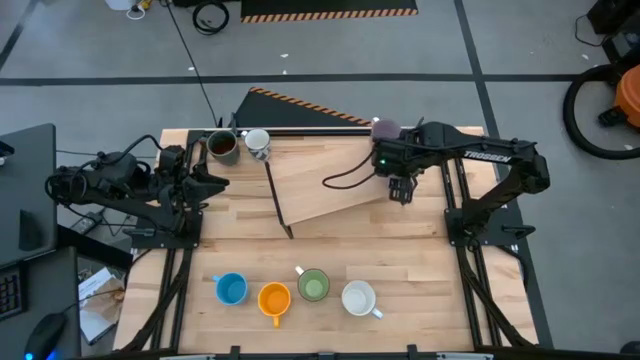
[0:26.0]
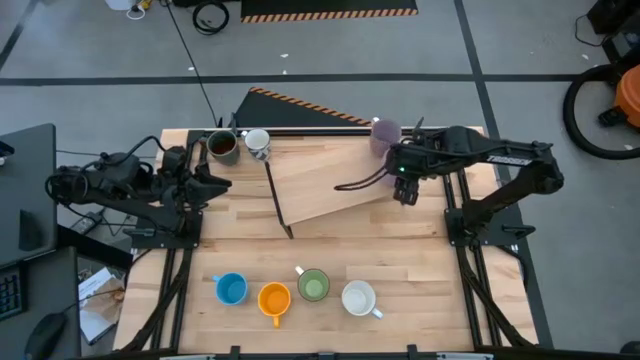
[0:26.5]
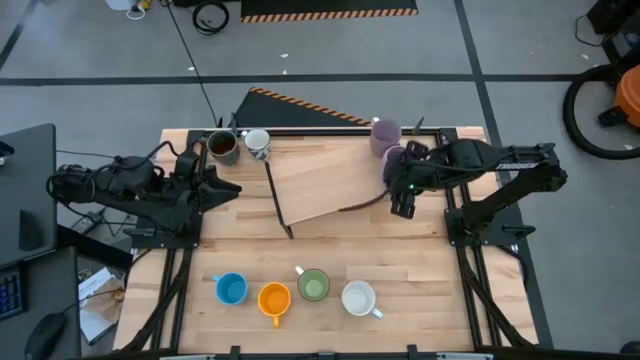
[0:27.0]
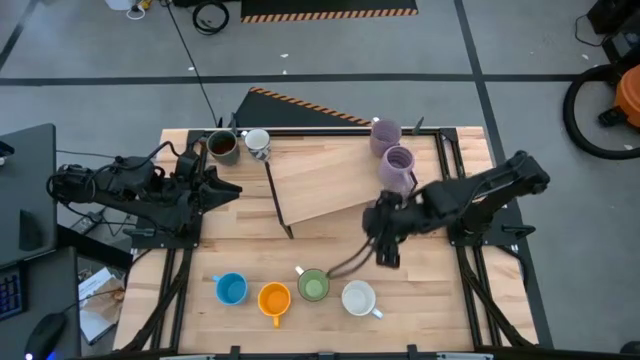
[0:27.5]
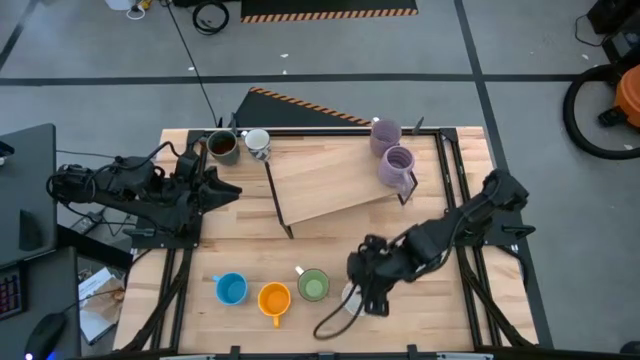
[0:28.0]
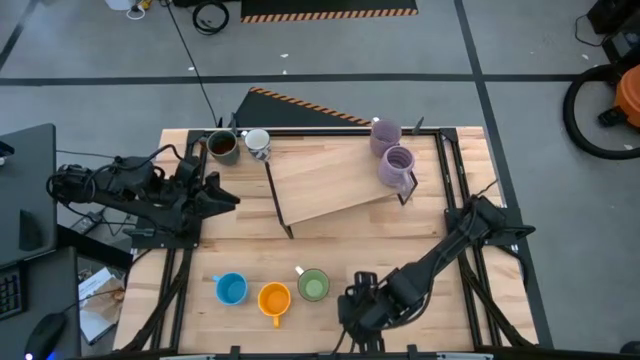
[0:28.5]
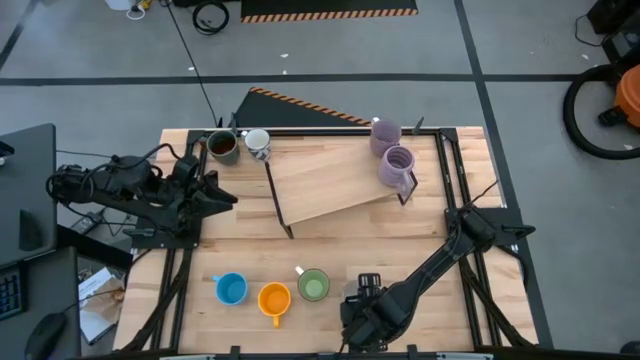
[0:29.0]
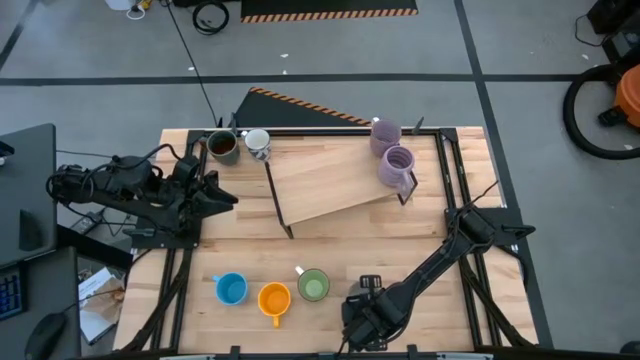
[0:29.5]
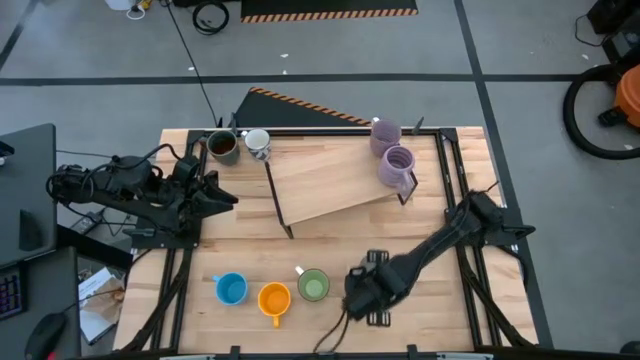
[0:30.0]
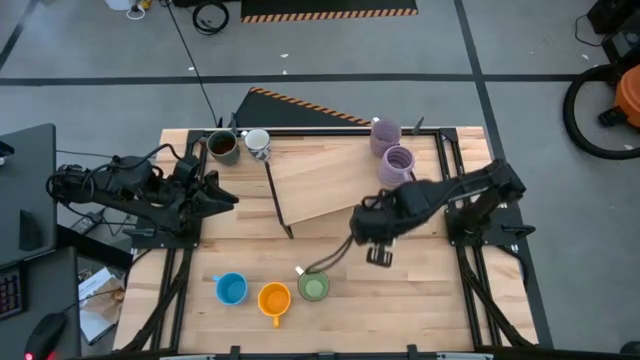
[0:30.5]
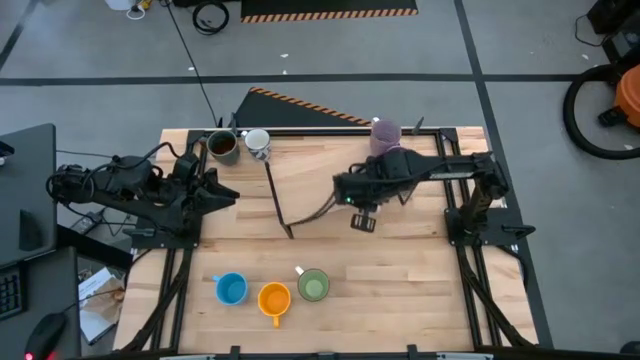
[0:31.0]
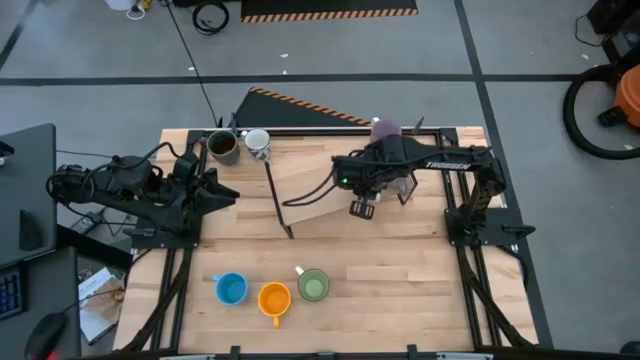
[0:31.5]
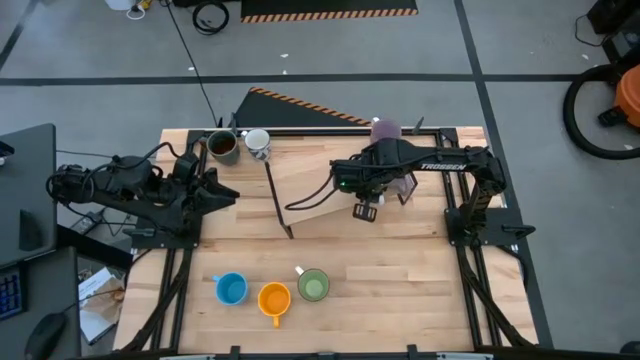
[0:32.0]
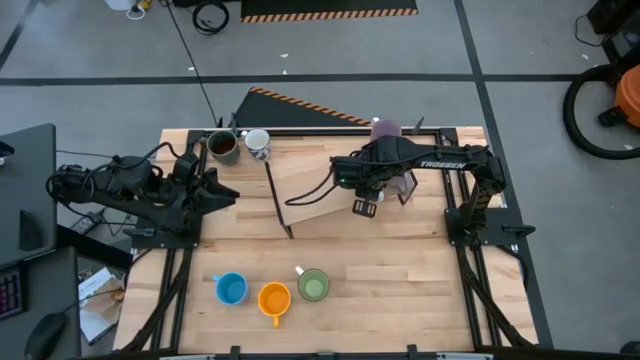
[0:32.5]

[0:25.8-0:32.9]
Task: Place coffee mugs
Put the light blue mug on the shelf

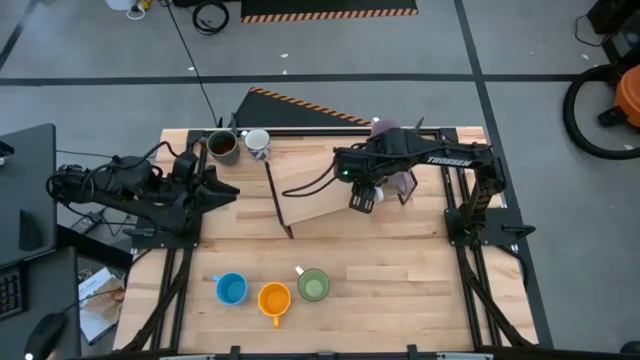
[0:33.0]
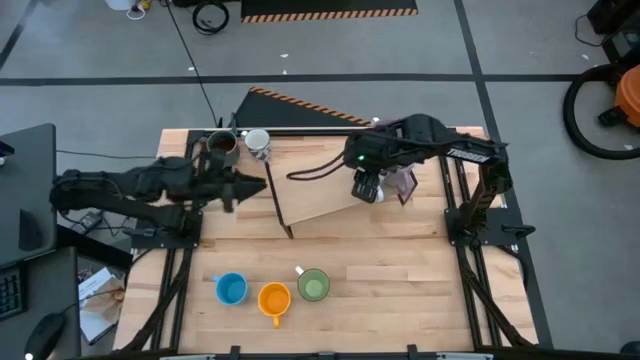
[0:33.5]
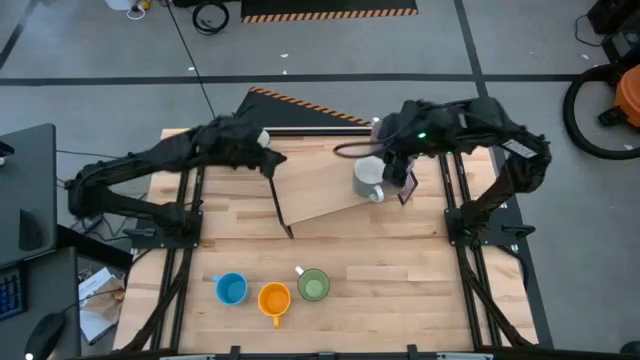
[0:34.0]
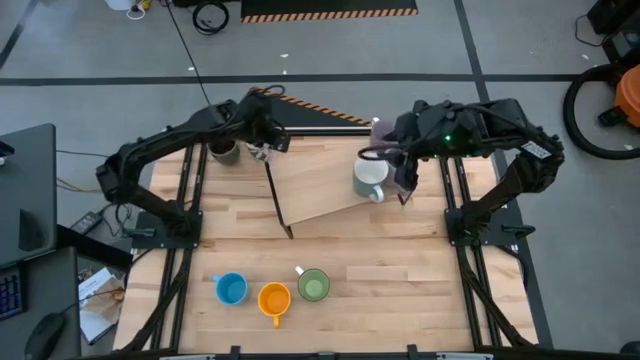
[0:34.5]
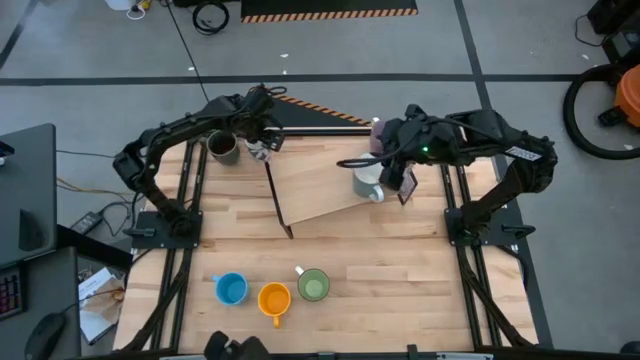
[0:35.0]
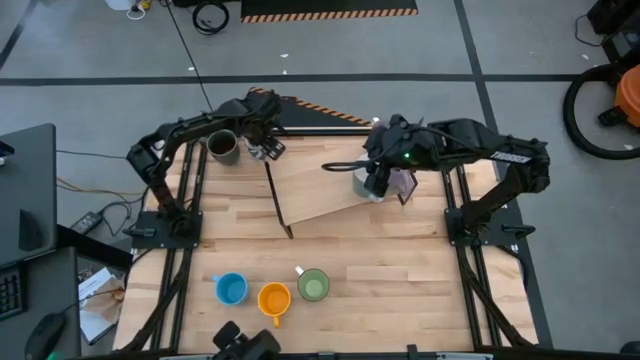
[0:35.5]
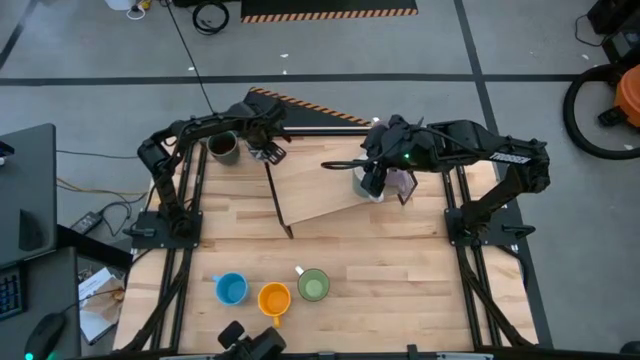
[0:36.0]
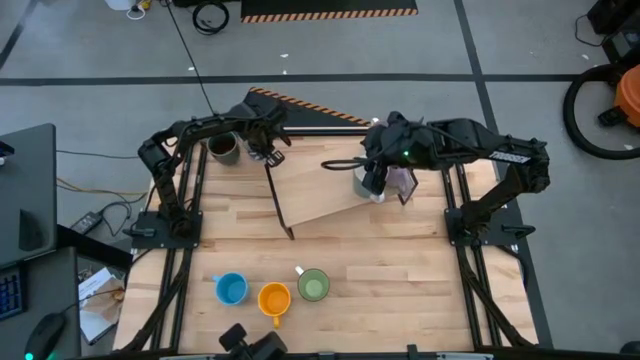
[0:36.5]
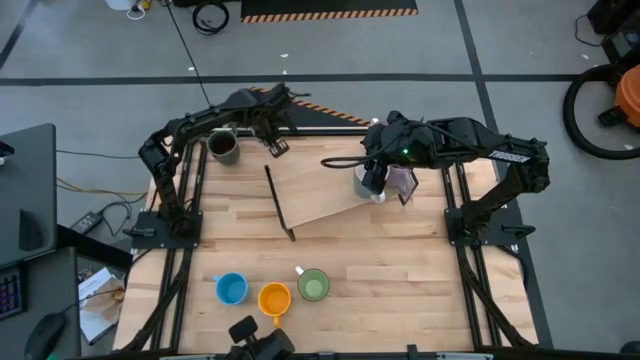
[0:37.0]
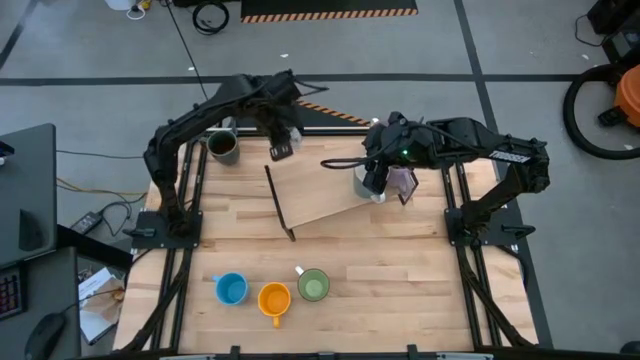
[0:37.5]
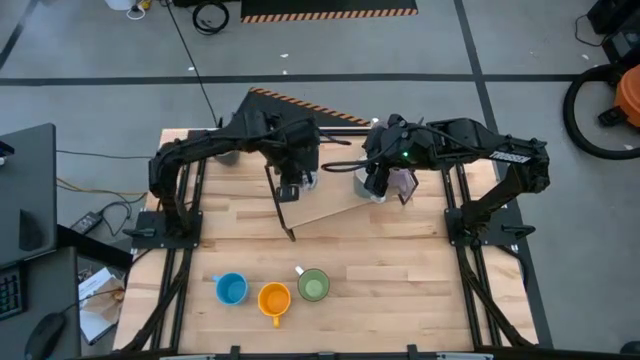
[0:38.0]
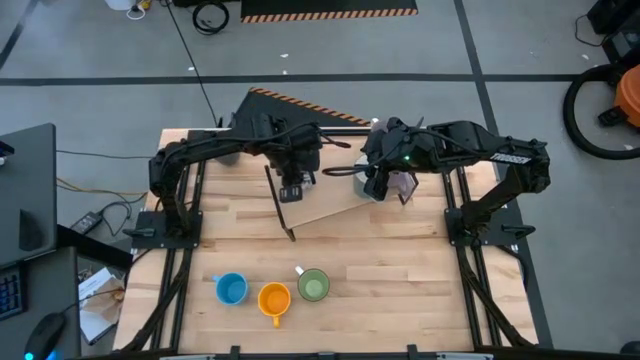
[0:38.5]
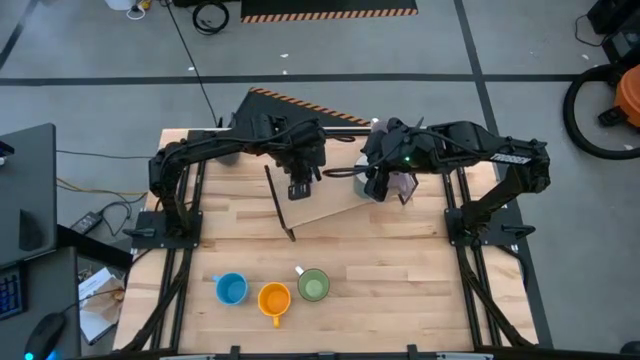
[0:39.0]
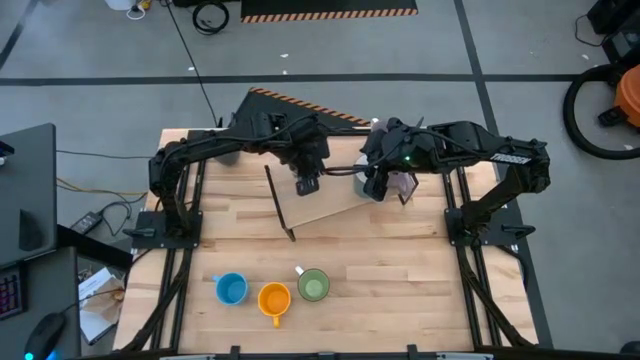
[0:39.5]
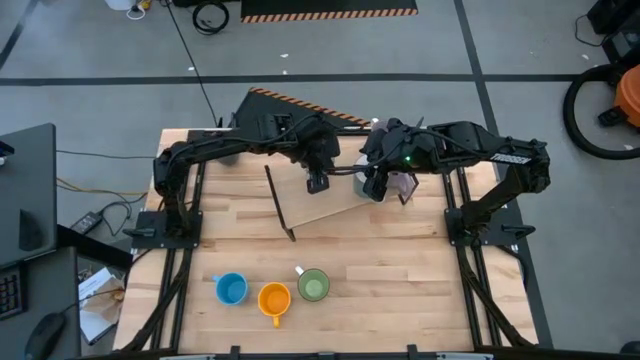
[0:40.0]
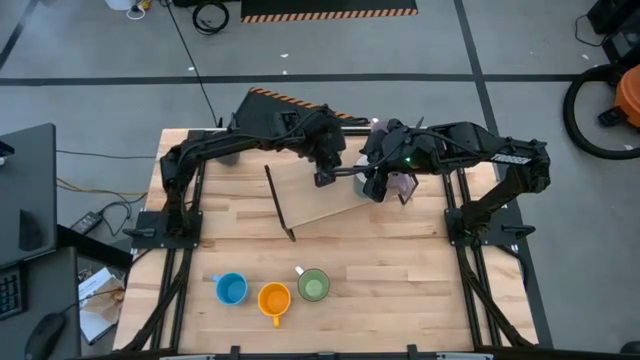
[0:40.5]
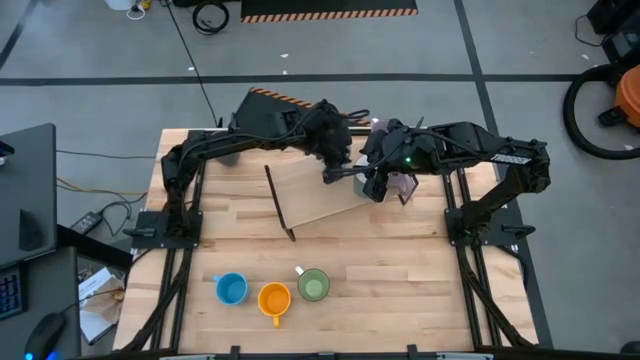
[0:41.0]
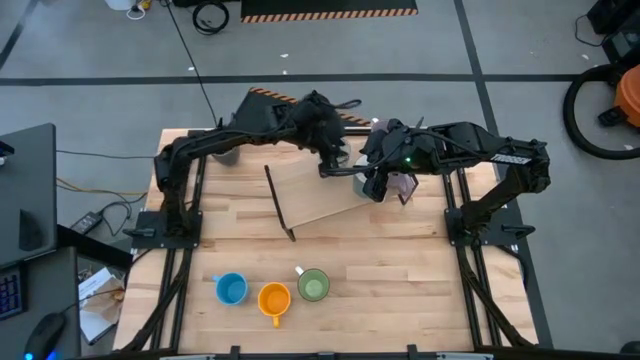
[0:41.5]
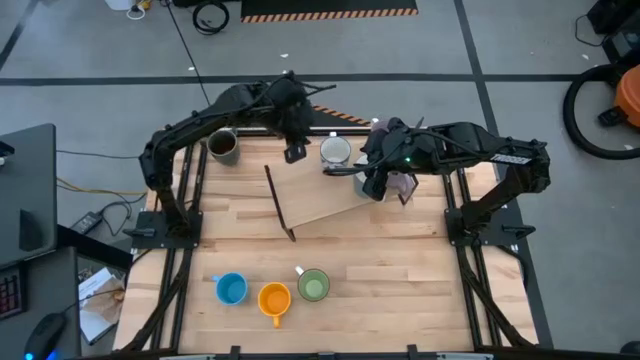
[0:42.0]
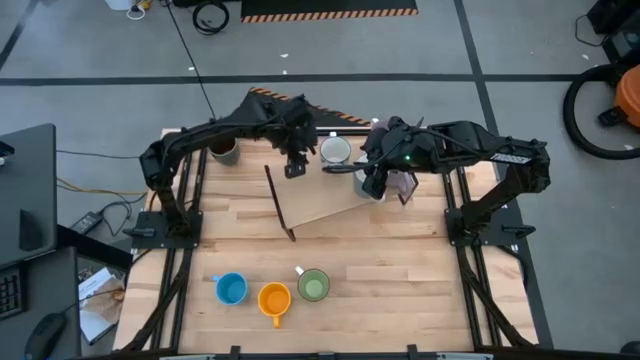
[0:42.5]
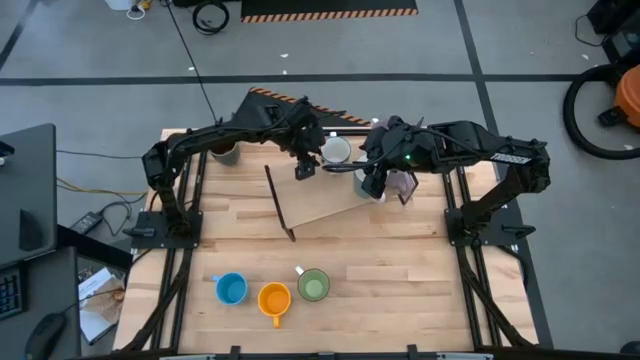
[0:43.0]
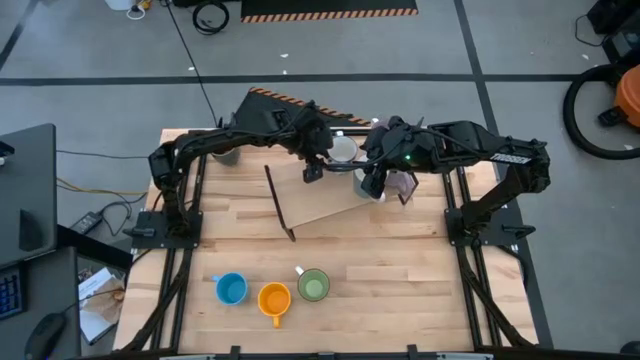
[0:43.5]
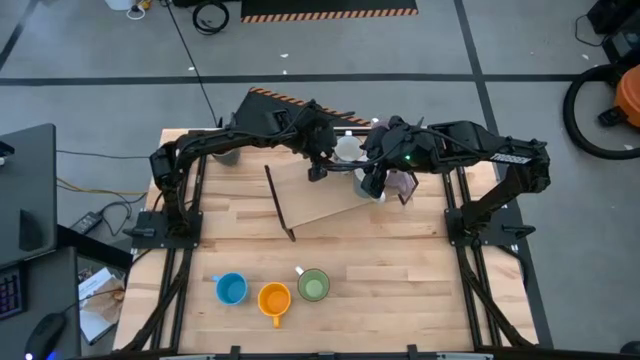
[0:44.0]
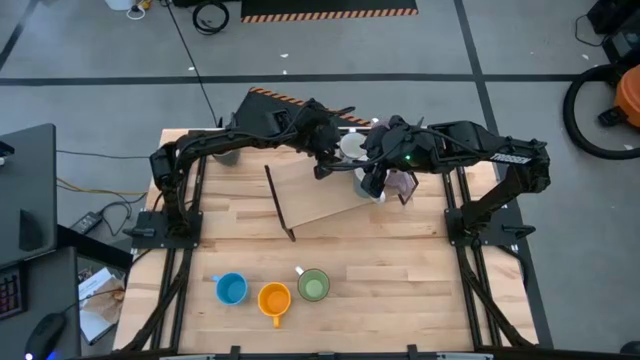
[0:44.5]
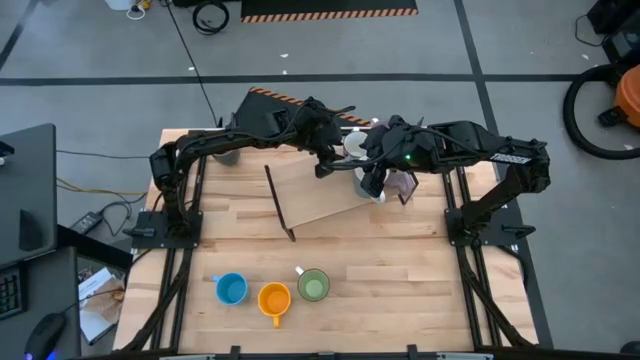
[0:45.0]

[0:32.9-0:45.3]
Put the blue patterned mug on the shelf

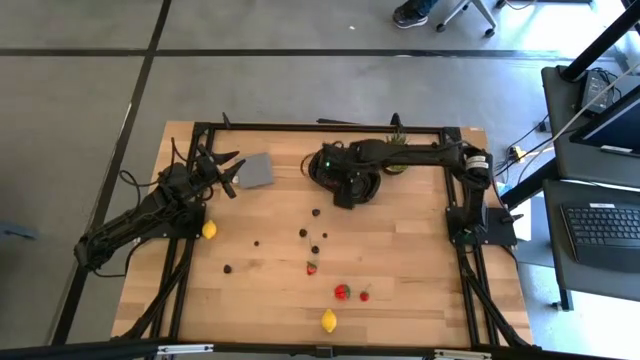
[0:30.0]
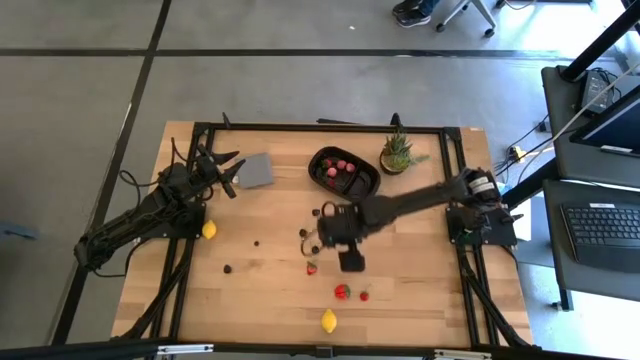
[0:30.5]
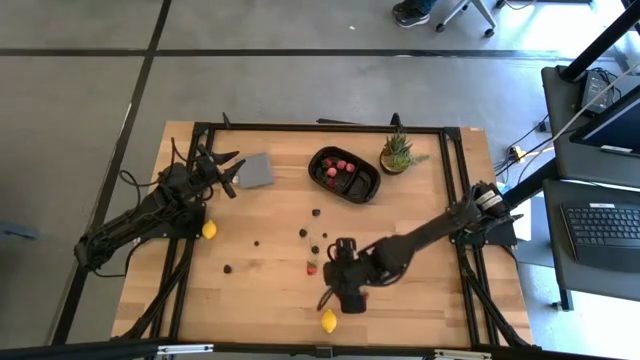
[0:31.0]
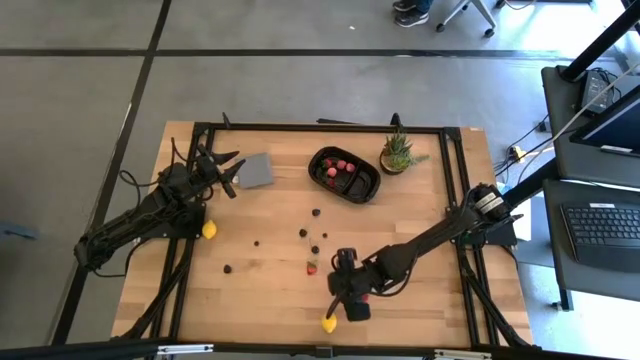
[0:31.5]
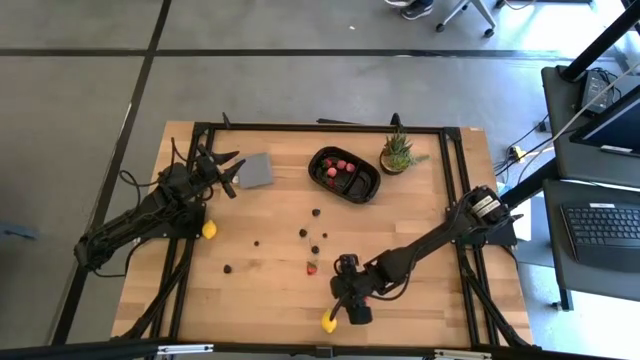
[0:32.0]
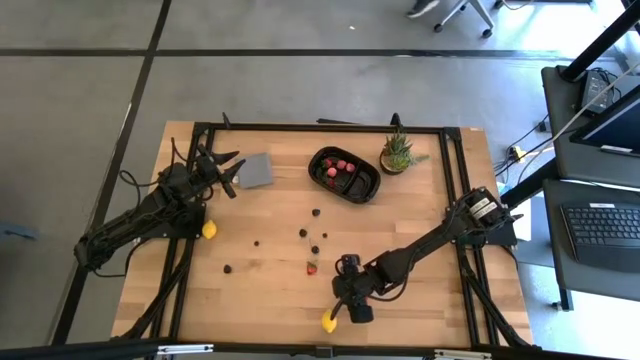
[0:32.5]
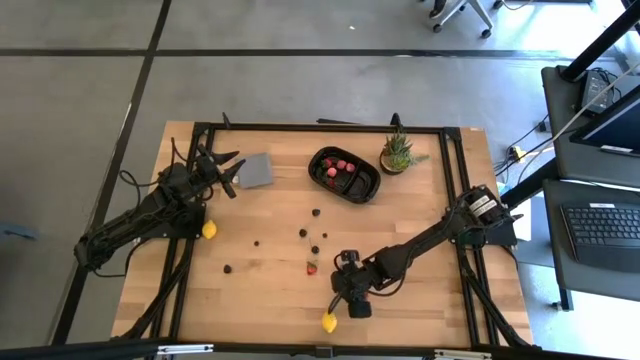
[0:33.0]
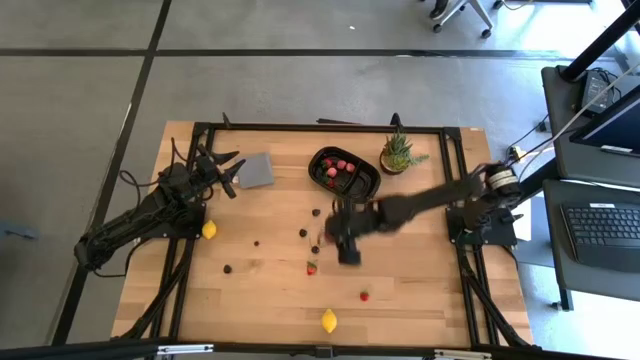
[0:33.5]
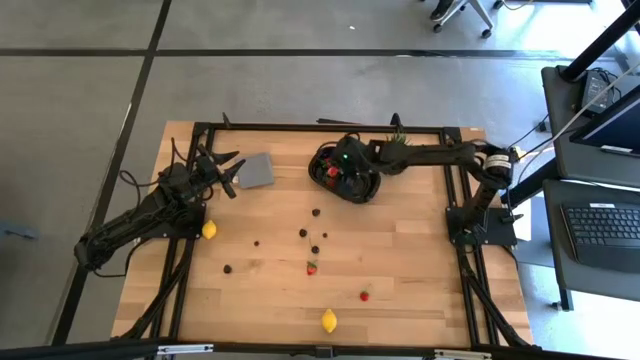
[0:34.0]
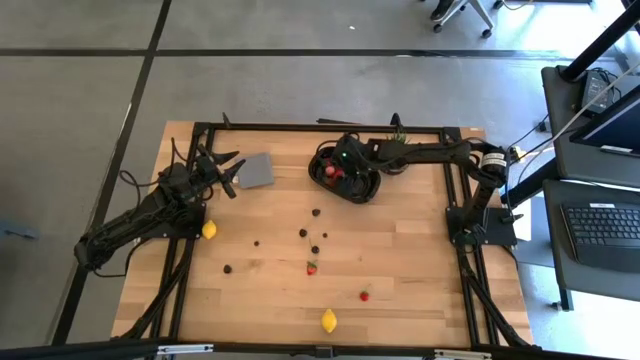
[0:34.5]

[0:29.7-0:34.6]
Task: Pick and placing Produce into tupperware
Put the middle strawberry into the black bin
